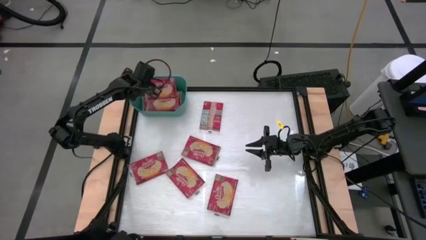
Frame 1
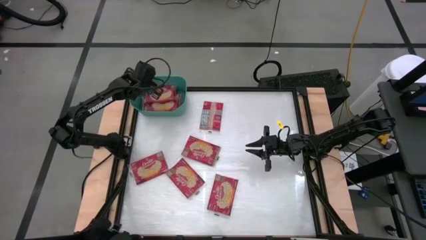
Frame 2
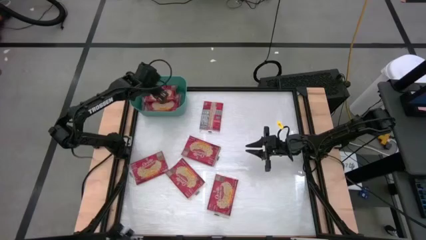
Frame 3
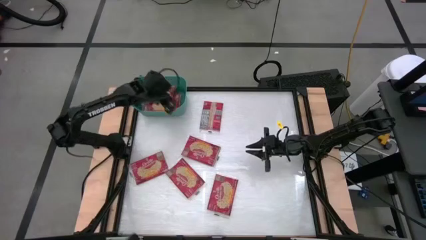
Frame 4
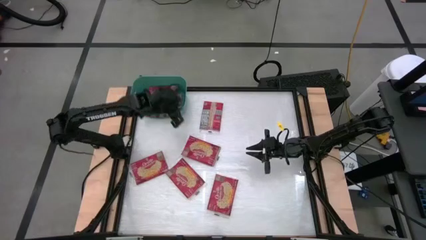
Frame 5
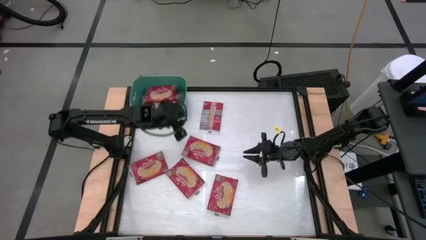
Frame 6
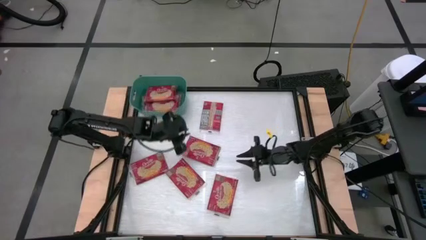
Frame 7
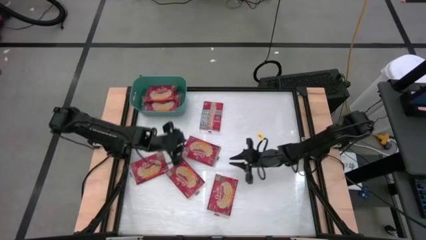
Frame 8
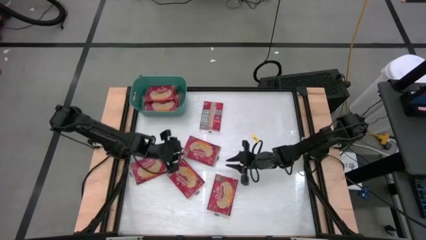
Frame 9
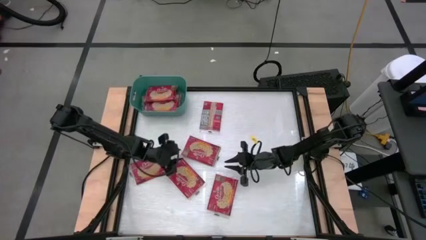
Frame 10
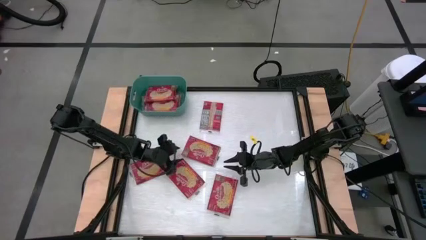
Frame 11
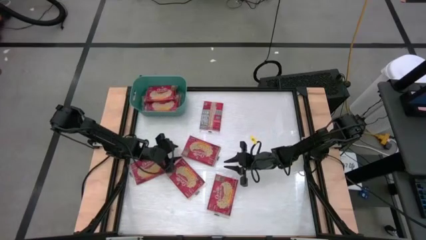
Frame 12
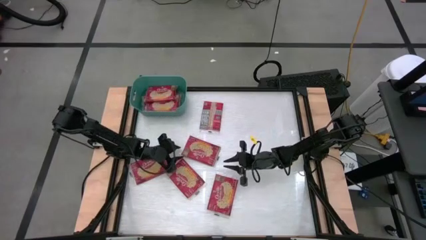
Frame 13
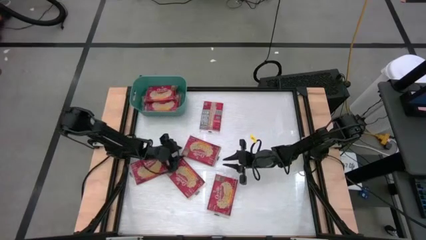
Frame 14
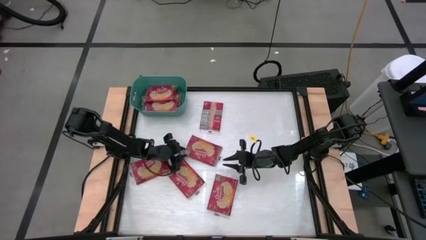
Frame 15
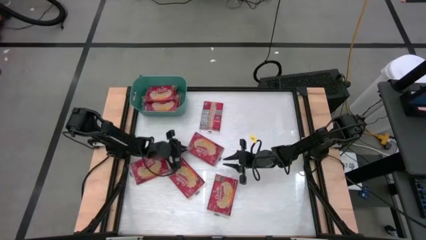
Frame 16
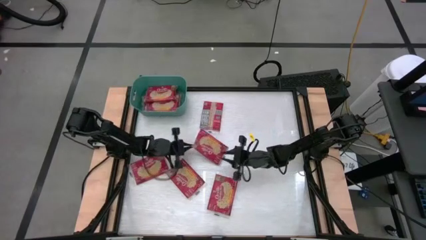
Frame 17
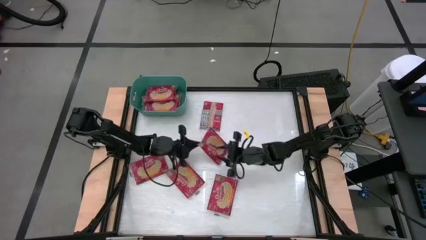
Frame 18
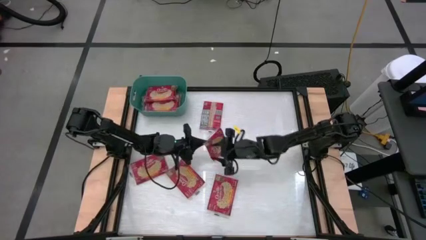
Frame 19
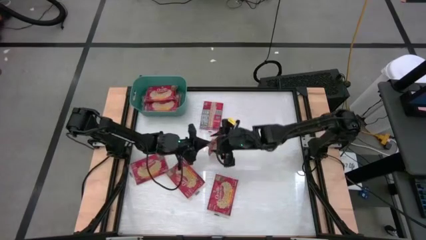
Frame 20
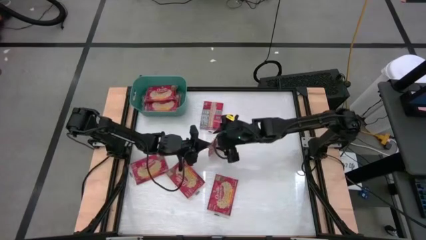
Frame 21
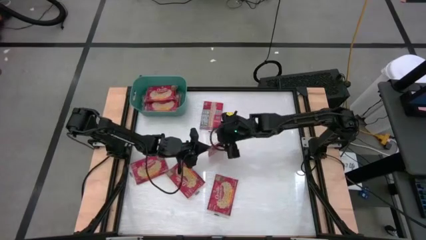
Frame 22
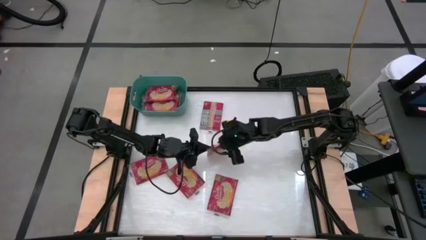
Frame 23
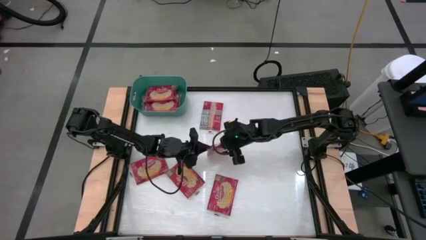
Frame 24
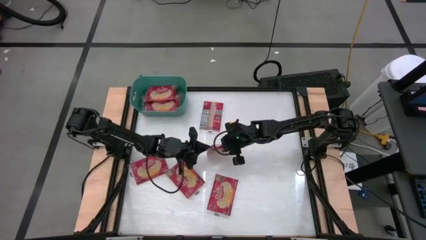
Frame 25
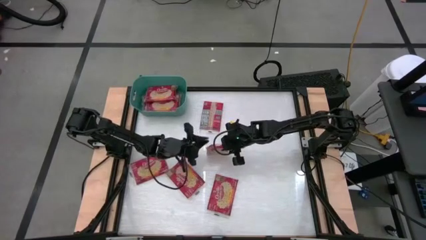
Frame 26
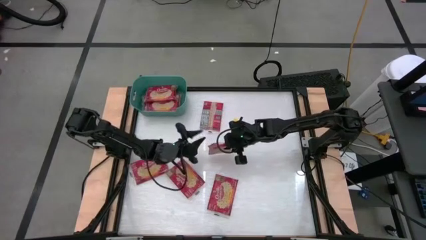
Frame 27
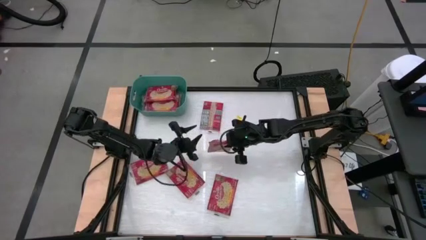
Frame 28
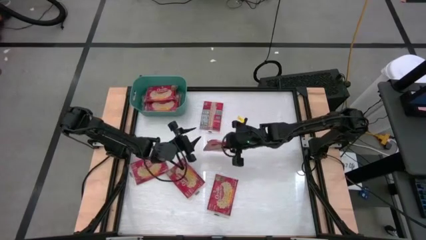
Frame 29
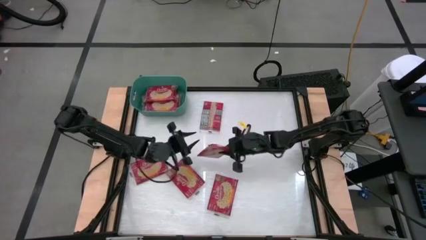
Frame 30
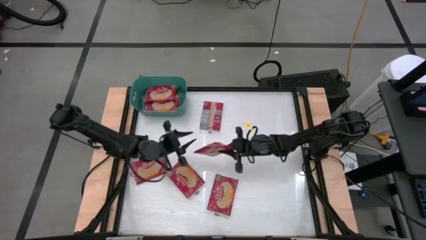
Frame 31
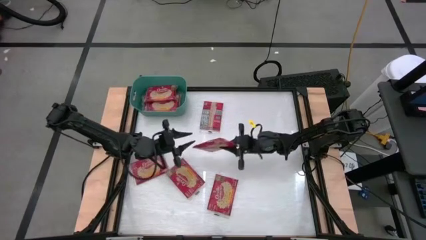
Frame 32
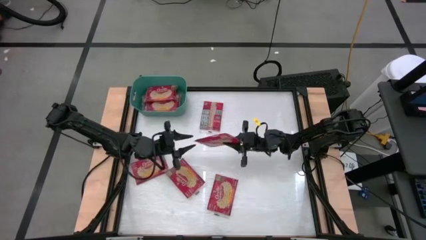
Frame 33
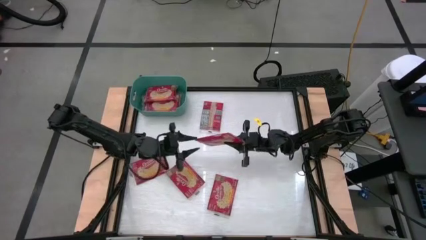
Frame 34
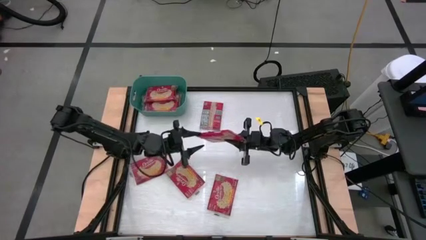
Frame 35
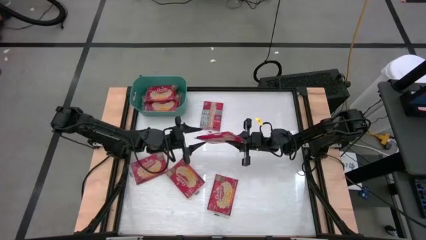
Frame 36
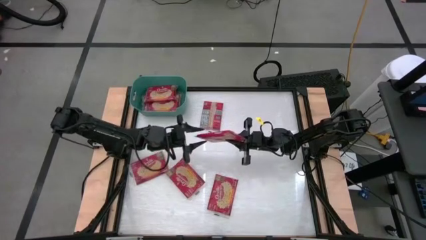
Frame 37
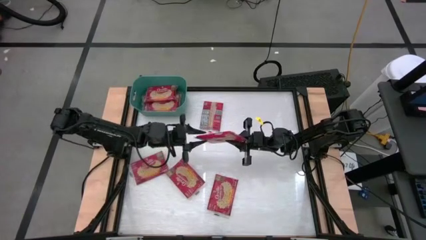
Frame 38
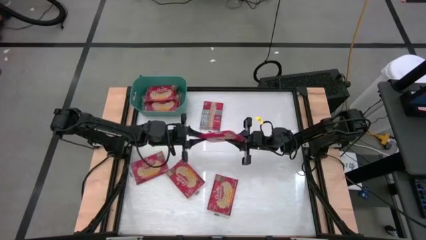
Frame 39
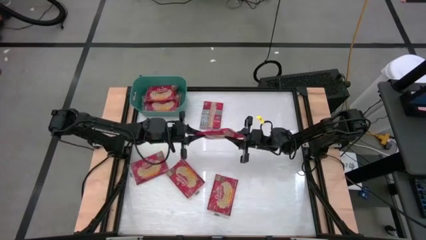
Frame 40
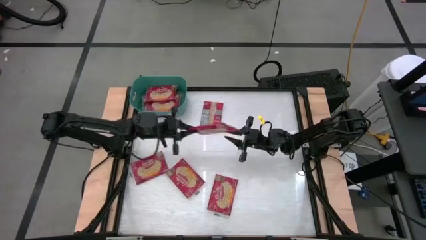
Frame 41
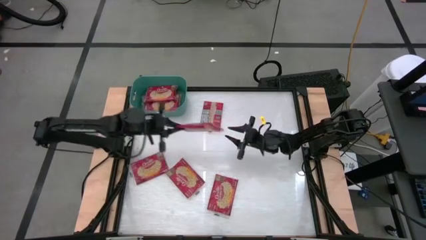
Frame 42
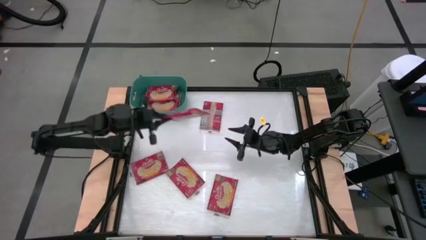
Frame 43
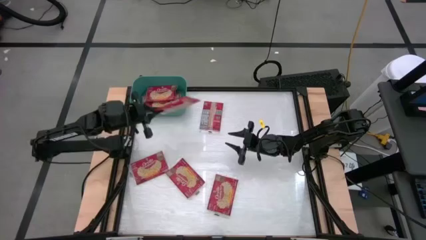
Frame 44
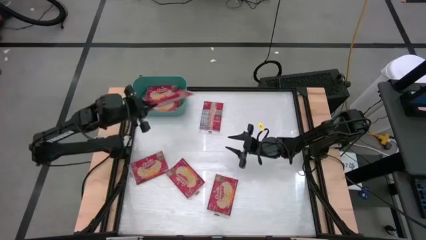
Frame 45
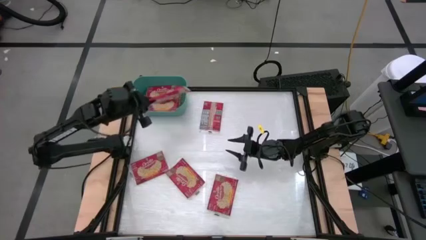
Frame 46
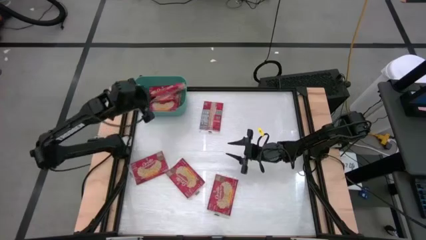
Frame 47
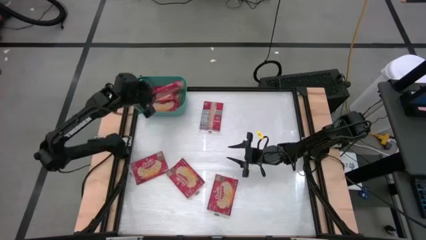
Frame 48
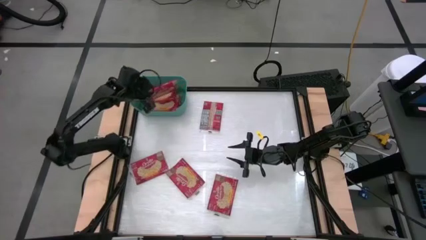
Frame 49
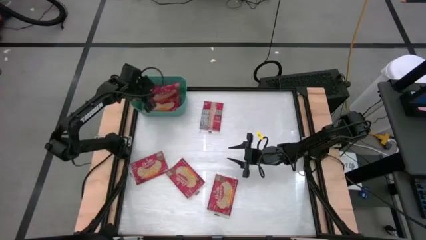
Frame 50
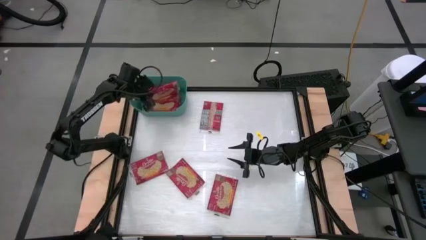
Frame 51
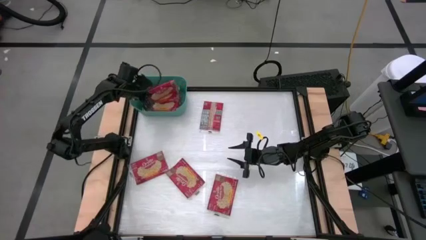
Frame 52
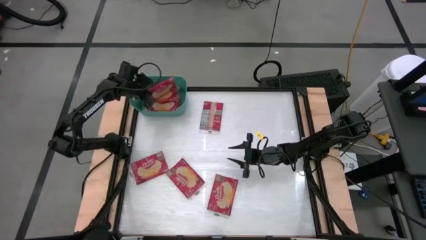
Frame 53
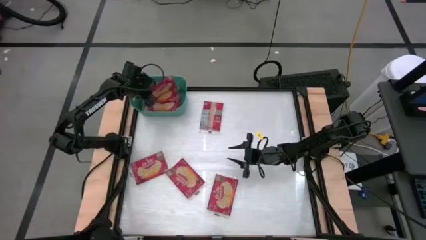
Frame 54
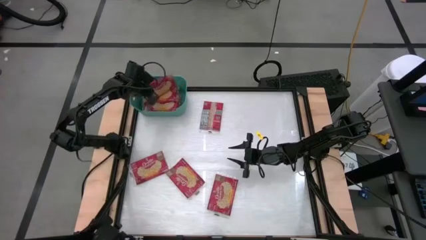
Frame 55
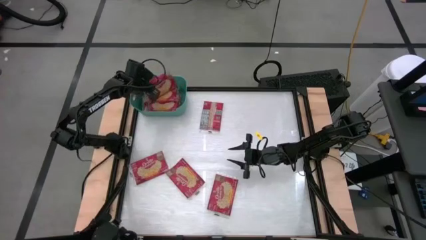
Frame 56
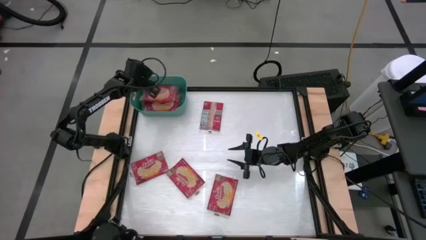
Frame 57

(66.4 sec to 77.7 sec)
Task: Sort popcorn bags into baskets
Stack the red popcorn bag on the red popcorn bags in the green bin
